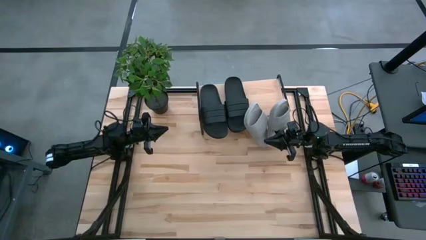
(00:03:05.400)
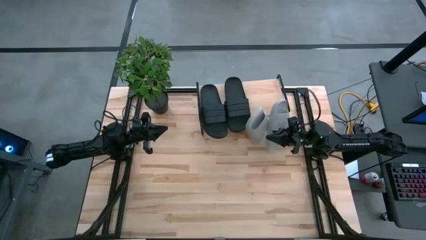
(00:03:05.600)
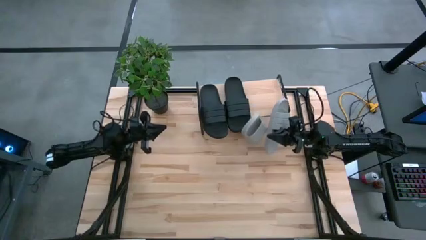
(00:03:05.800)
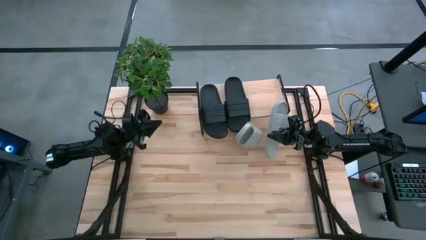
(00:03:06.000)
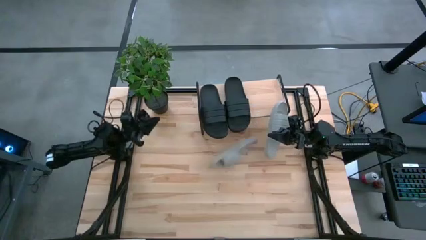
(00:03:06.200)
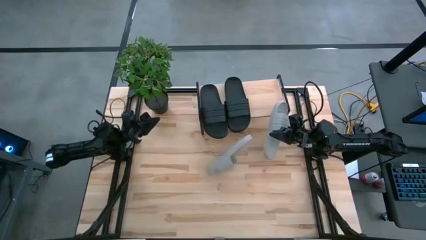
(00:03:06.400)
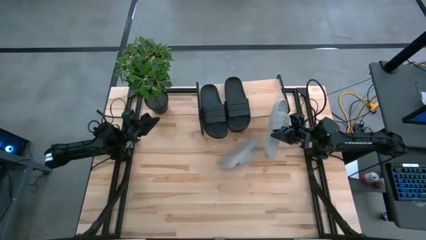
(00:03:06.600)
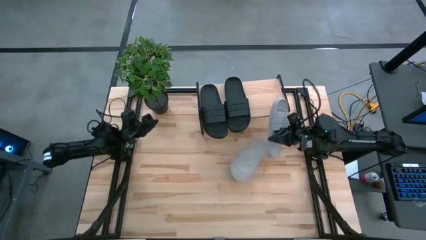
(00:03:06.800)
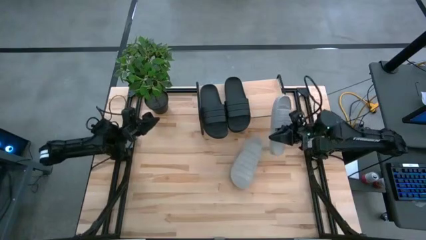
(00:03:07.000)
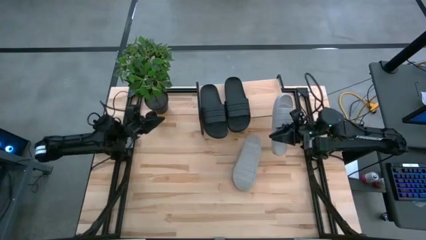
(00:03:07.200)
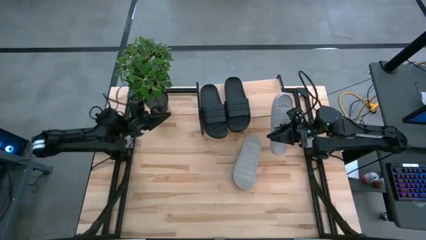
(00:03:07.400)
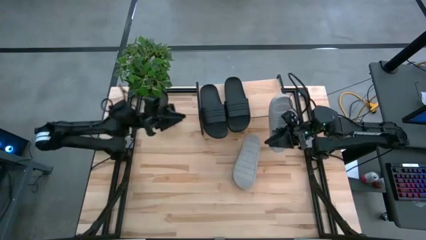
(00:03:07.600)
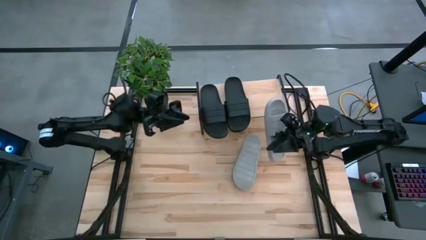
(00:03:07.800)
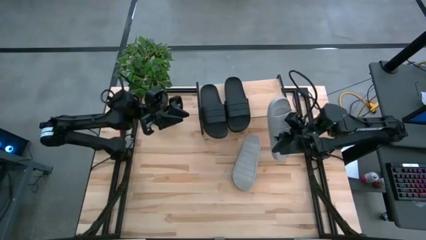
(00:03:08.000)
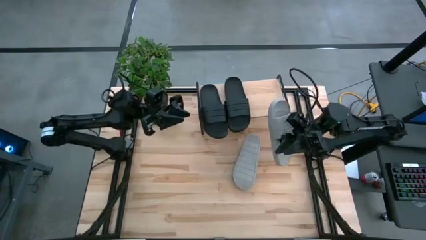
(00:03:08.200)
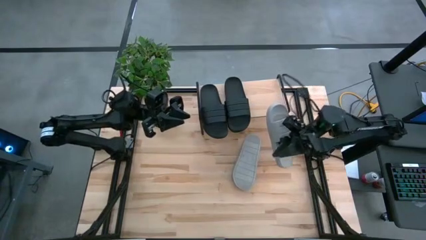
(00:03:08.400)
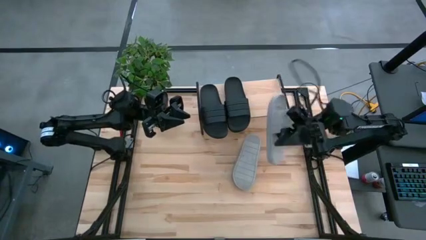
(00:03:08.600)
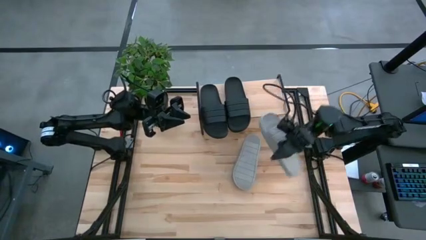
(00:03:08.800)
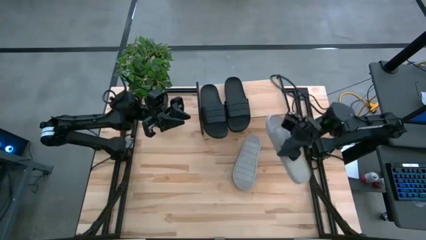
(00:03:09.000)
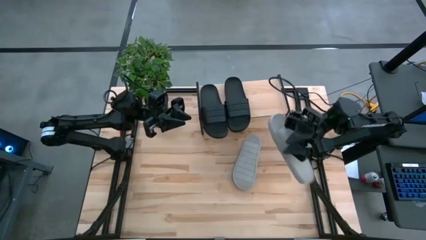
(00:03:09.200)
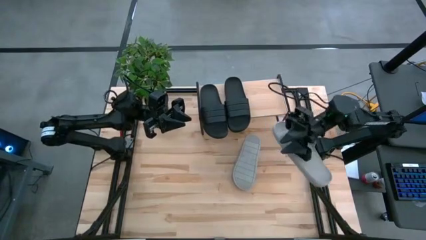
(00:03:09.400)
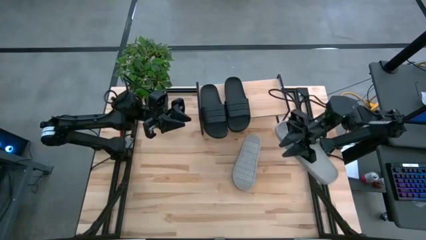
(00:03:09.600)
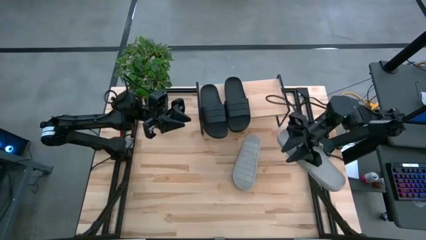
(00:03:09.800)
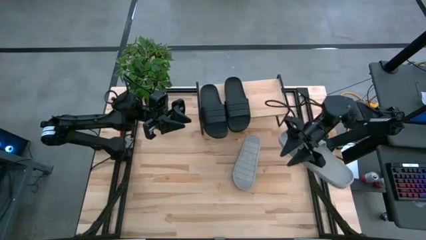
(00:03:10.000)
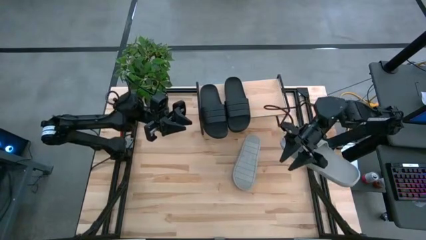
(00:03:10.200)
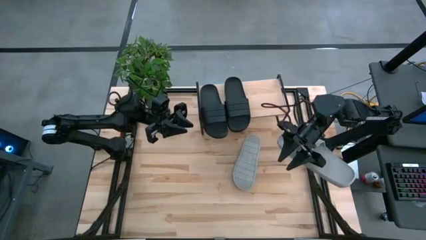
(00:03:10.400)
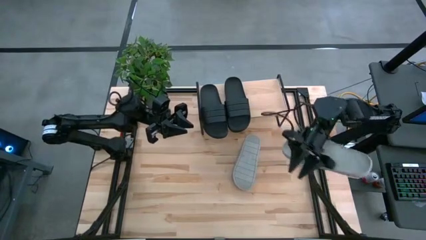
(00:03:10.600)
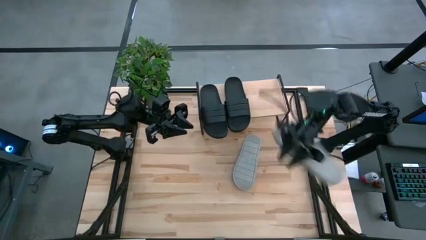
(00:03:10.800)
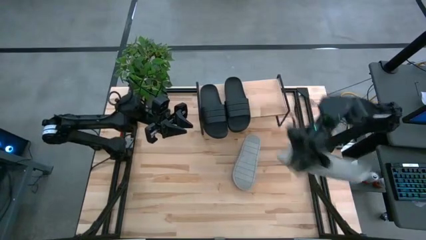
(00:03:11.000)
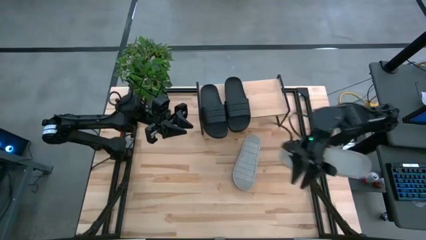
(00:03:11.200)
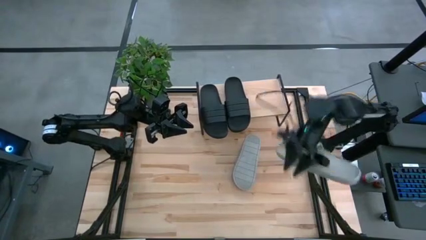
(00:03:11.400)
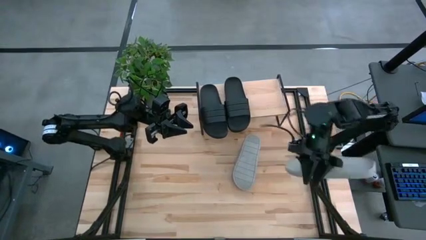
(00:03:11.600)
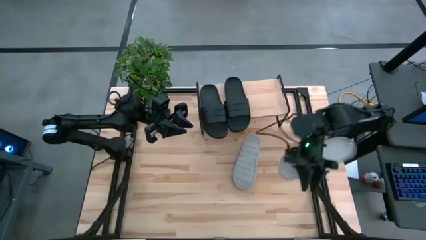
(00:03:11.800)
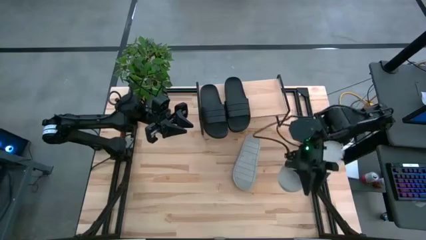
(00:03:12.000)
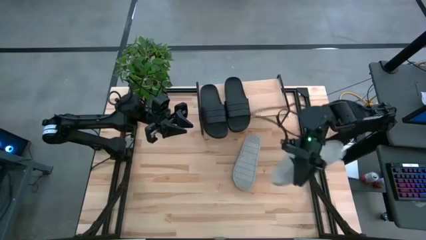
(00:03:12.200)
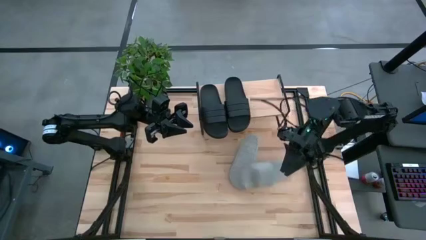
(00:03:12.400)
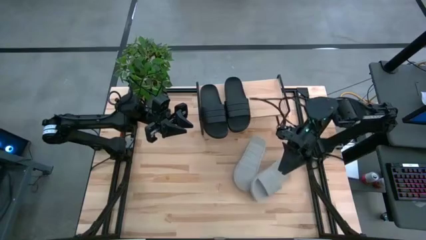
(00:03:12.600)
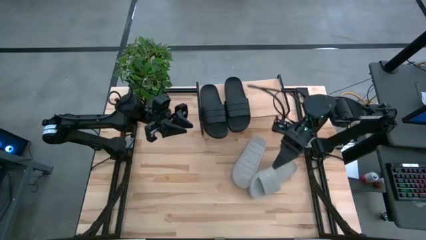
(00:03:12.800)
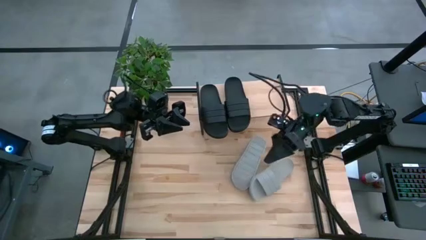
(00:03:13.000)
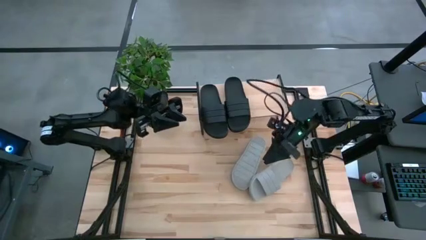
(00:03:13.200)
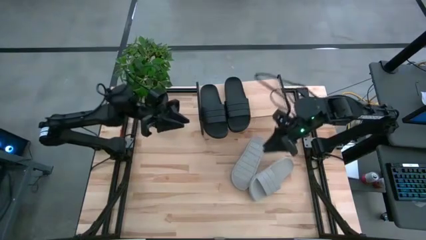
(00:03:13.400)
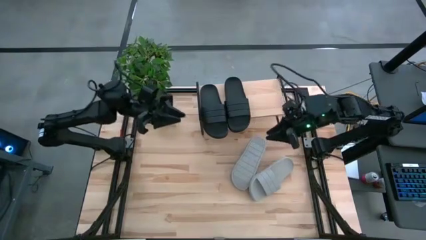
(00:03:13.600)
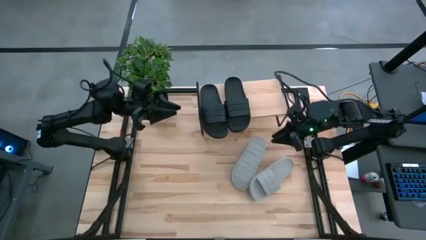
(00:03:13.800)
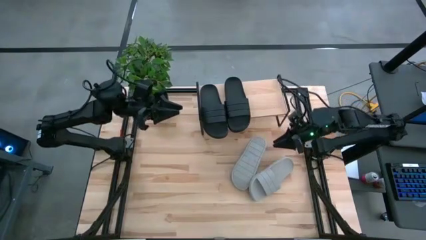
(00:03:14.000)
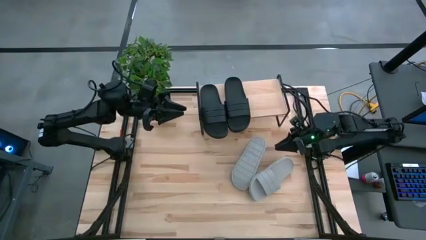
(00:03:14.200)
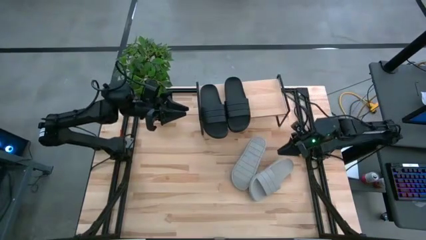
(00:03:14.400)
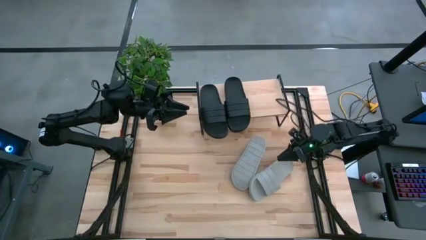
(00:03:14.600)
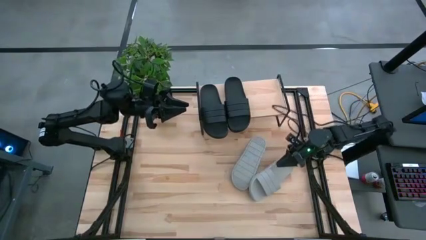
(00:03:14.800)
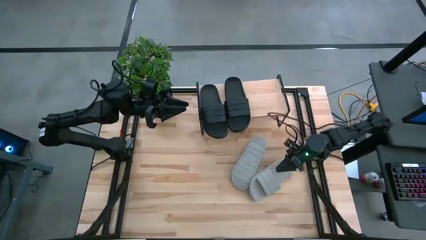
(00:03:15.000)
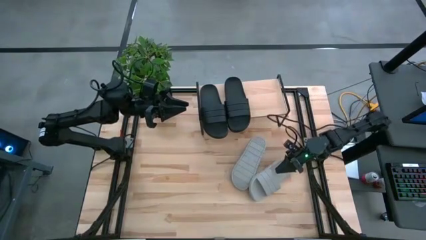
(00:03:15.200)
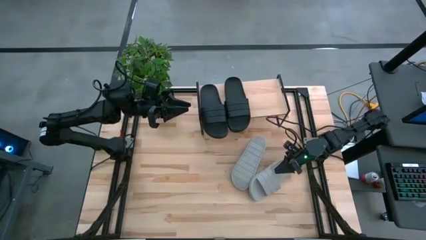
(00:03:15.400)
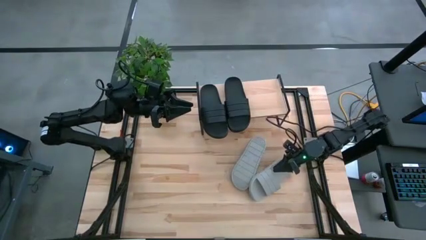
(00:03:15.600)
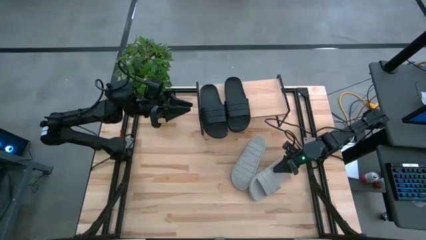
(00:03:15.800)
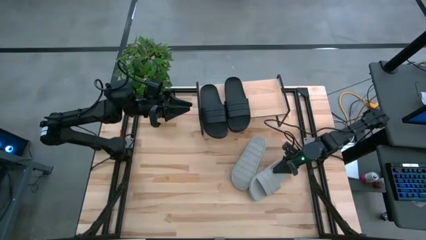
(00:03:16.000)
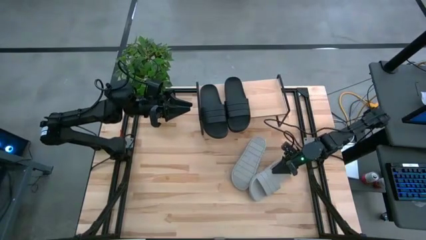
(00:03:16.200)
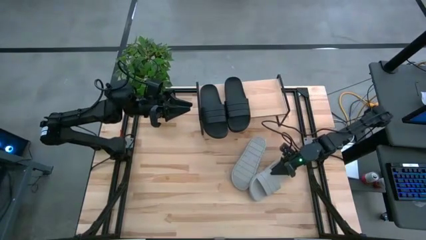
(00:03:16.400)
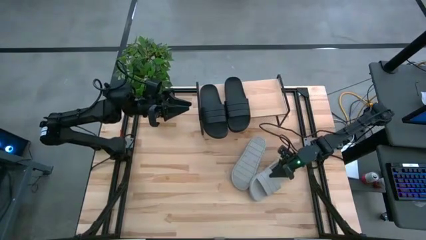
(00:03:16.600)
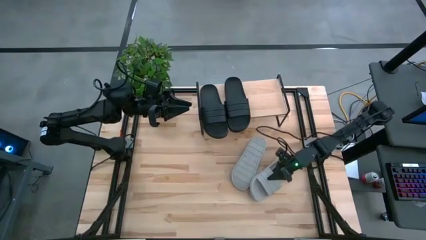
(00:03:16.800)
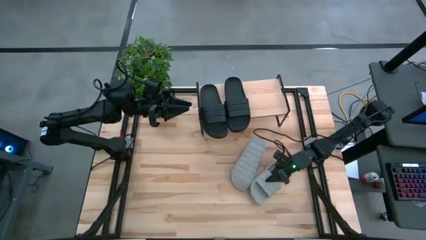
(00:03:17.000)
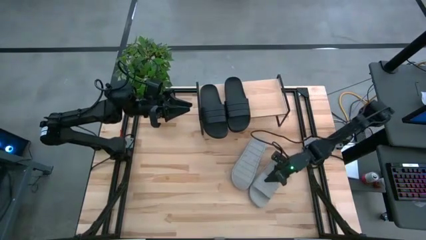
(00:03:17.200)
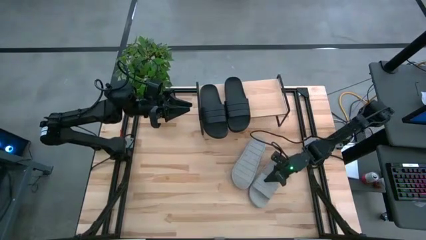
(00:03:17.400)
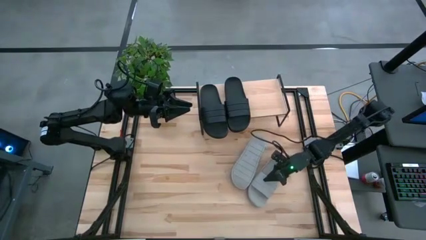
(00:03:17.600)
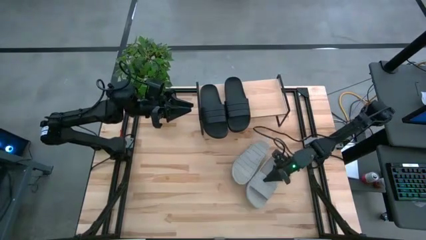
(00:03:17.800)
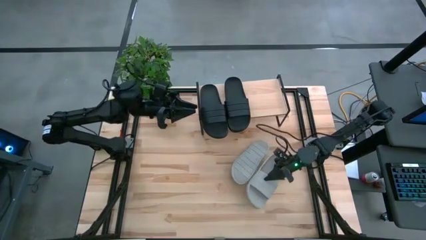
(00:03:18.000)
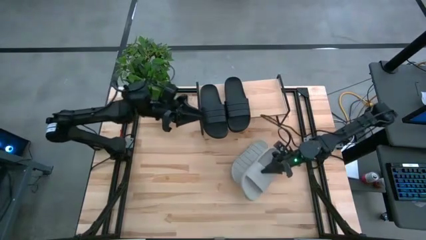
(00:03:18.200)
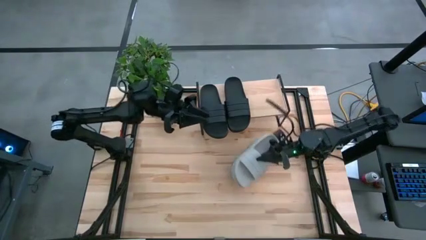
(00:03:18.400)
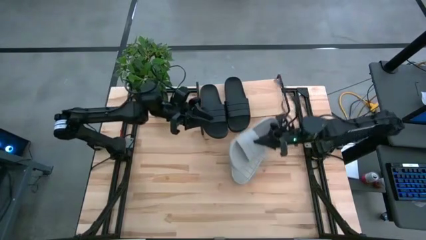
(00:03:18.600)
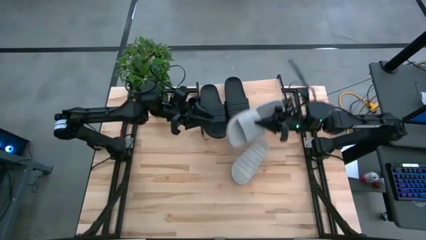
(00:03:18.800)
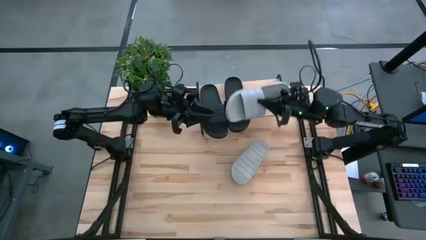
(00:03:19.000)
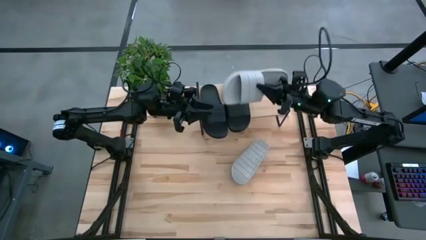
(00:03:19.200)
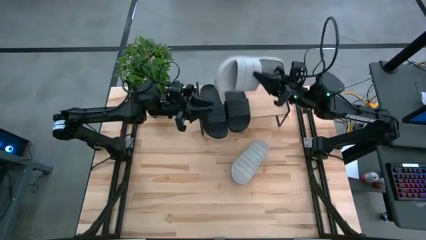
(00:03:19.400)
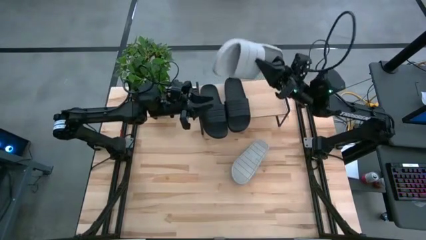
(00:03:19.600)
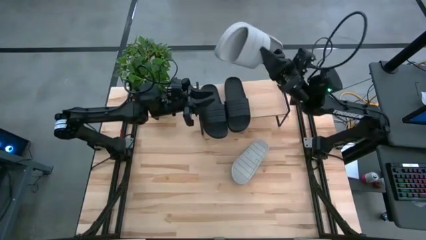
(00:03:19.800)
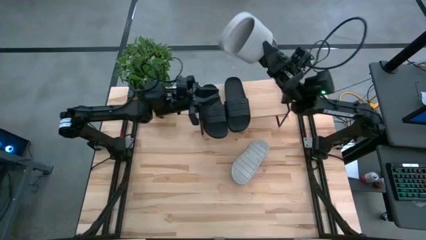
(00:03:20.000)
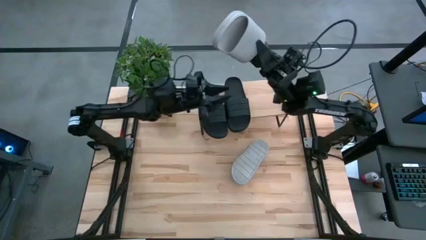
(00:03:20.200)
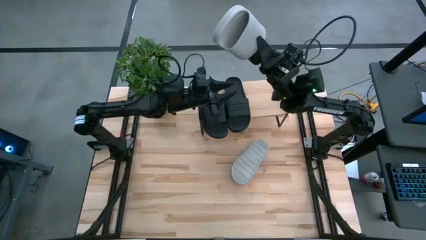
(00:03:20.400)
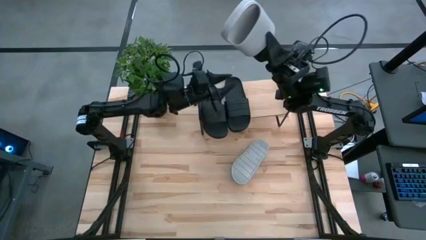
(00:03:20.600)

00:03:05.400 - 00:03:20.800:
Task: Pick and place slides into the shelf
Put the right gray slide on the shelf
